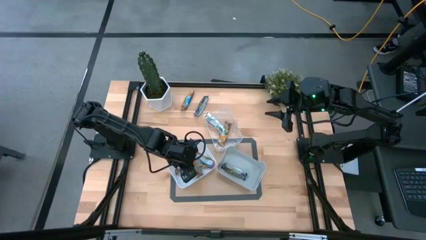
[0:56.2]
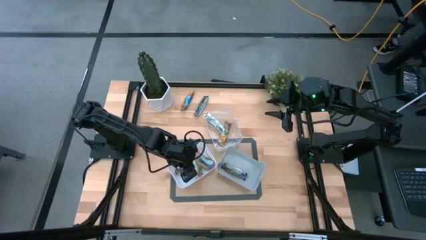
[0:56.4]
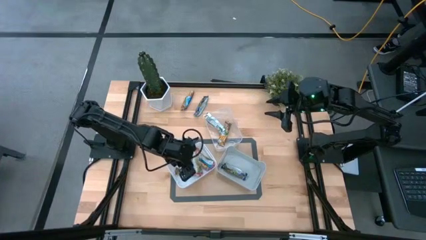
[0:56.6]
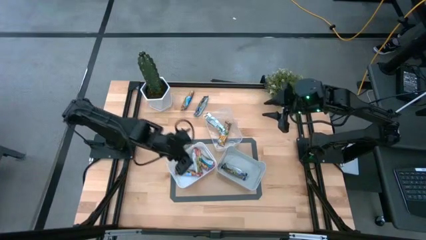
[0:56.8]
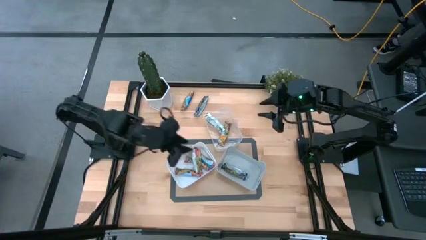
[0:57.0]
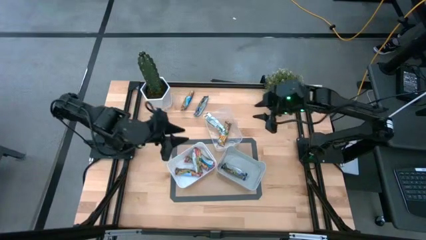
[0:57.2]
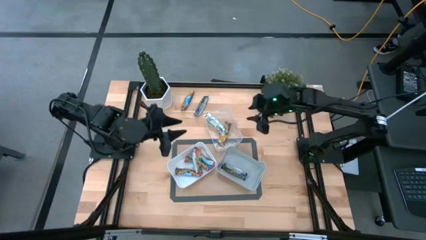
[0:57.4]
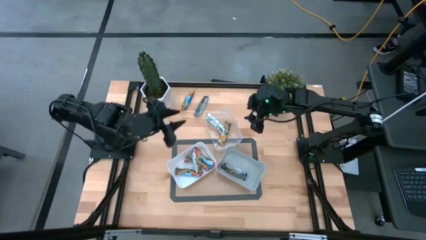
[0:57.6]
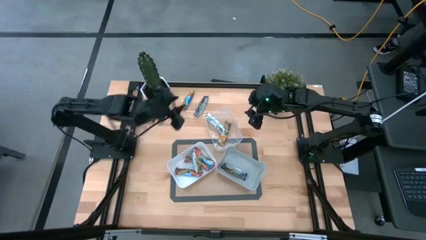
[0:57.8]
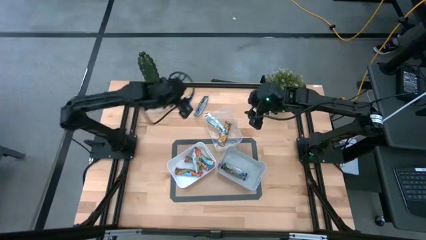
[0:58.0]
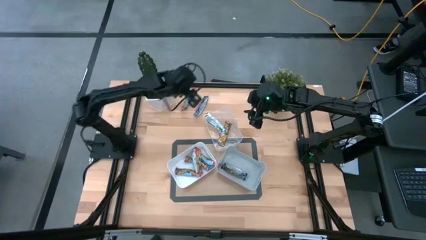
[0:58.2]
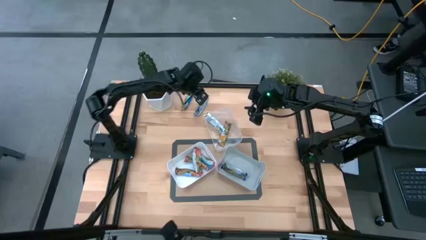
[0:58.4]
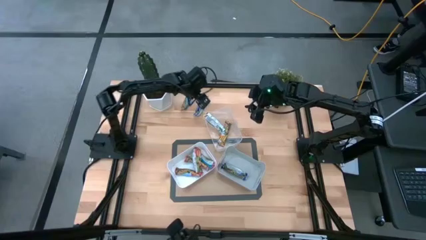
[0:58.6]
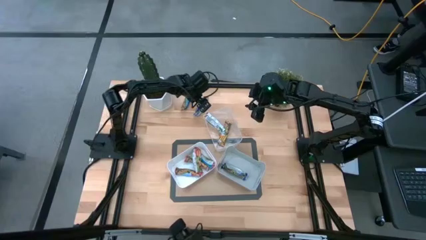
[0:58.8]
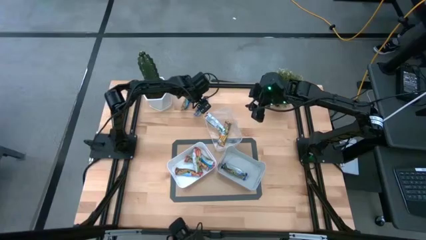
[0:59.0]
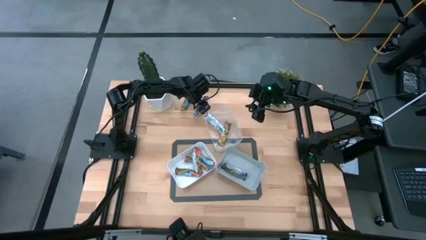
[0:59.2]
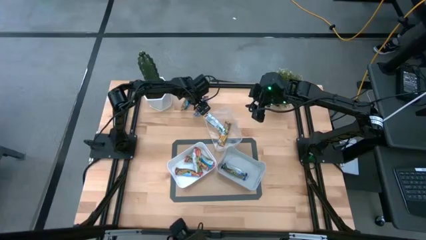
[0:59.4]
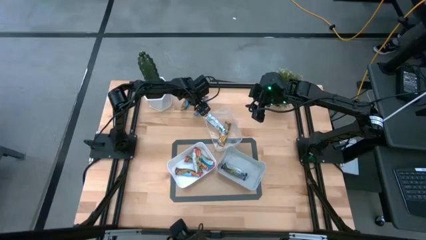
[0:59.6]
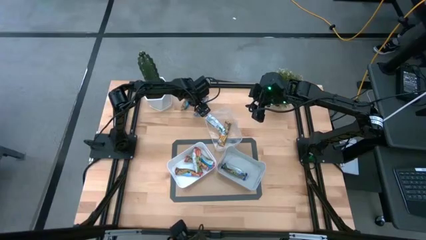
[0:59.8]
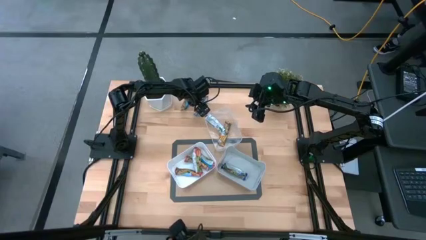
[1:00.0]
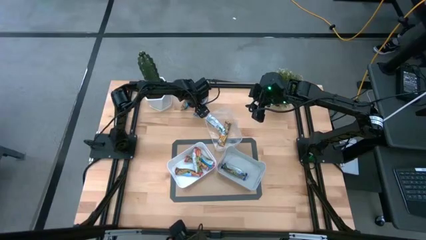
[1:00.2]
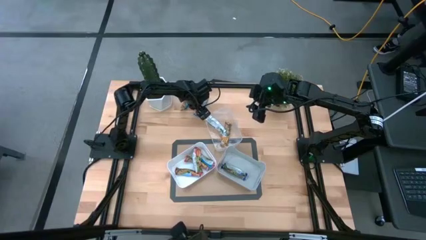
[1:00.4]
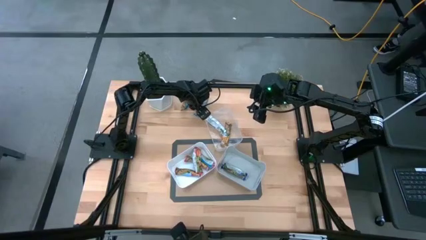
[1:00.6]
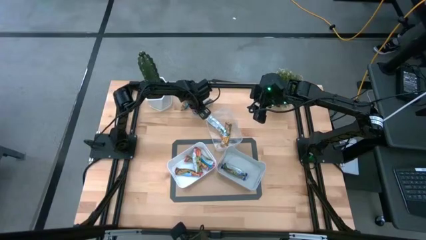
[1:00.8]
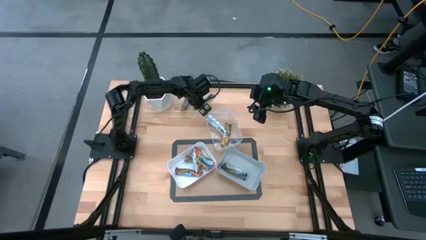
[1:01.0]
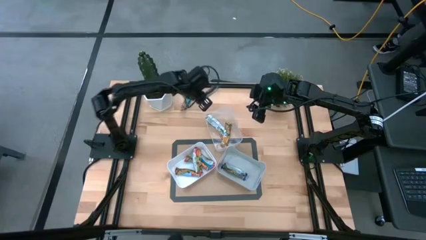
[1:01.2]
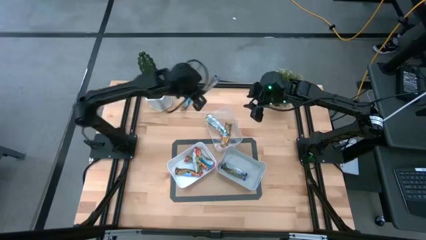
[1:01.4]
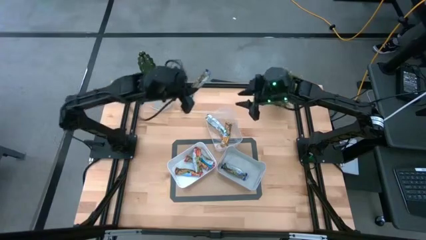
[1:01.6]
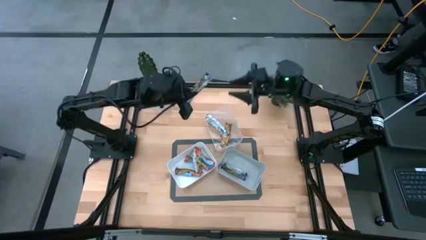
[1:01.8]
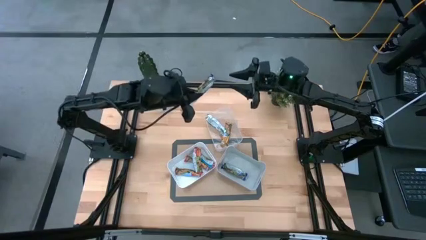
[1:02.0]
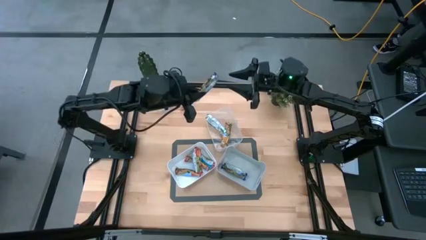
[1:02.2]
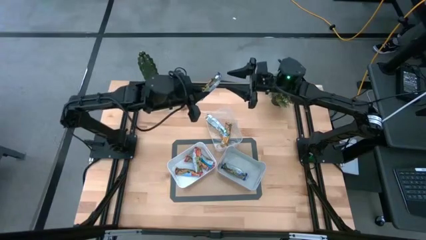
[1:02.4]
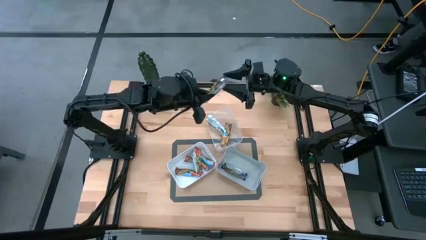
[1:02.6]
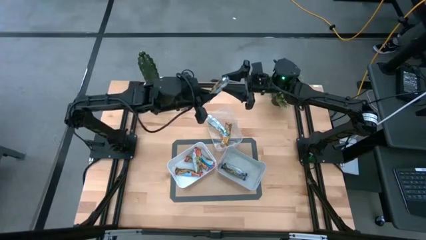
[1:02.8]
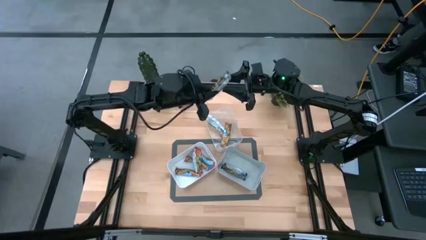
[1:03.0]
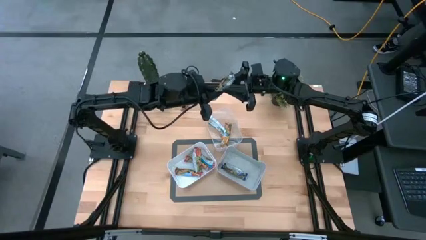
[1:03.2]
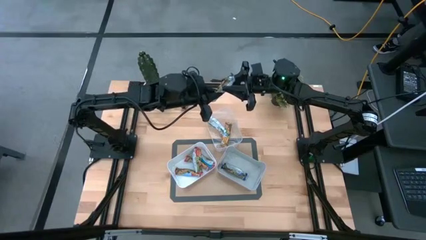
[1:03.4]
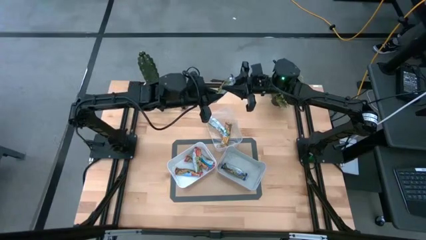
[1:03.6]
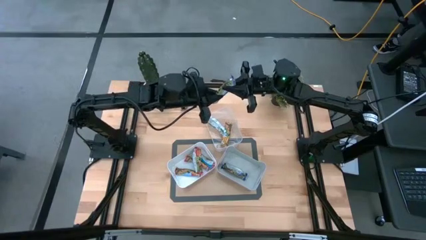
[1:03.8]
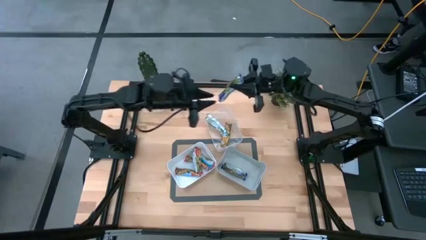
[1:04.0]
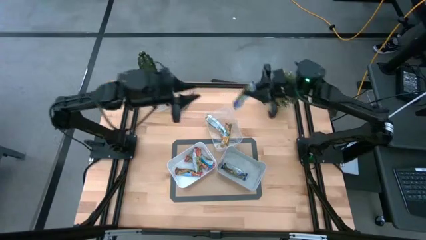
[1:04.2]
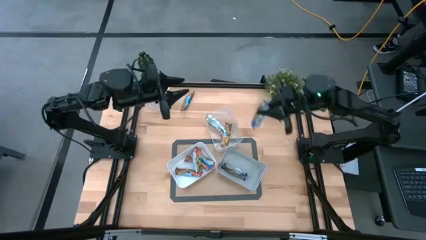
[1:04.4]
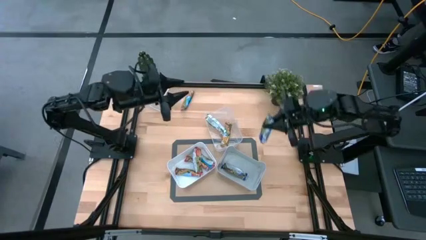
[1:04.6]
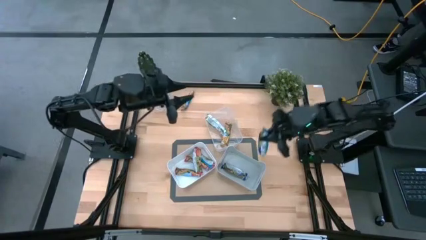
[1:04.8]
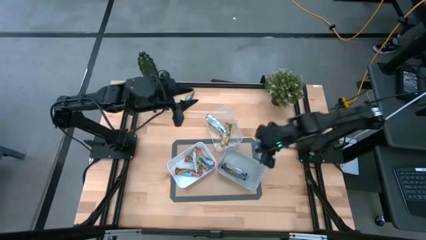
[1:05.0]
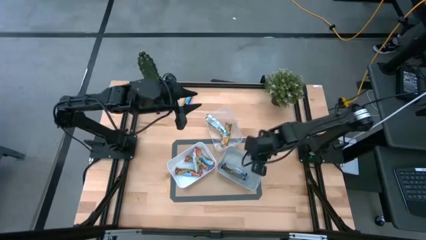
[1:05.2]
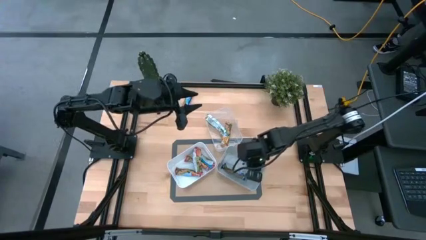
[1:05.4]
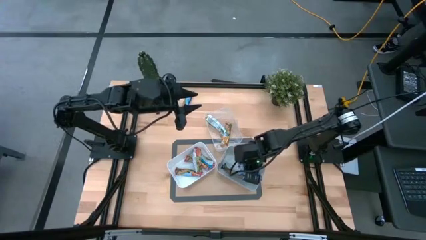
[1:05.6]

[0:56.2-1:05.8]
Task: Pick and place Granola Bars by type
Put the blue granola bar into the gray bin

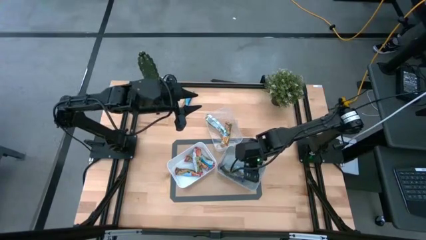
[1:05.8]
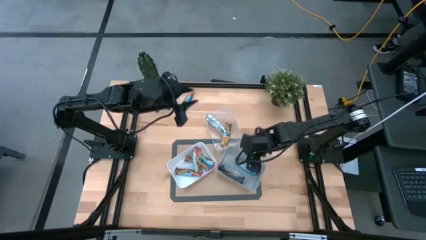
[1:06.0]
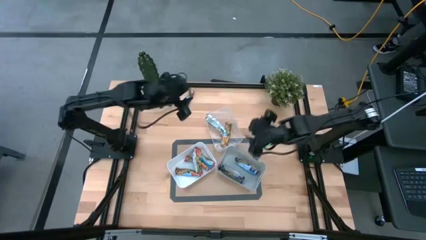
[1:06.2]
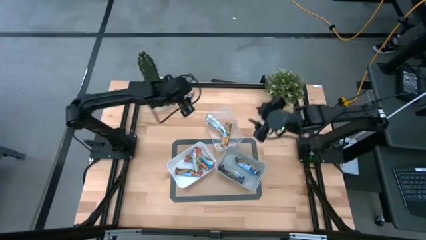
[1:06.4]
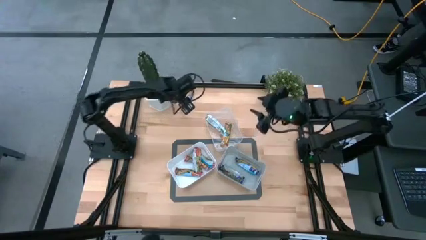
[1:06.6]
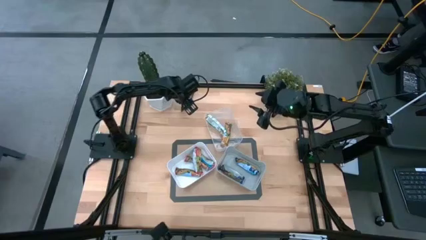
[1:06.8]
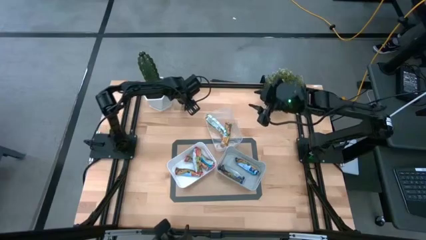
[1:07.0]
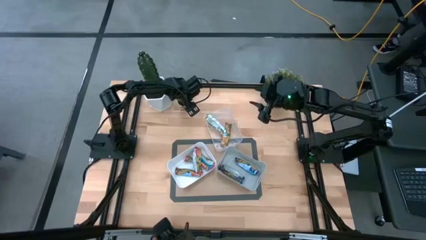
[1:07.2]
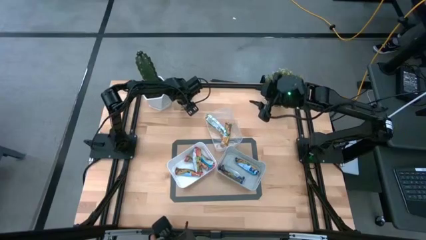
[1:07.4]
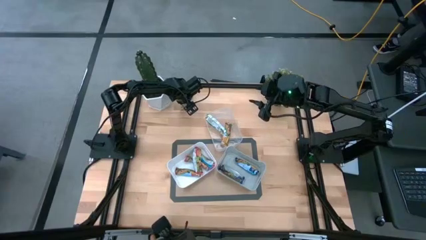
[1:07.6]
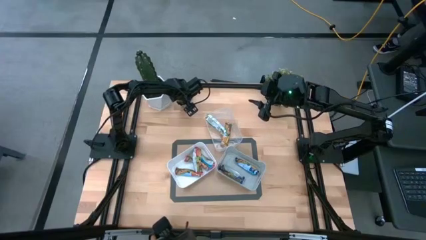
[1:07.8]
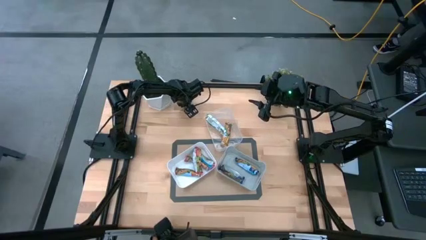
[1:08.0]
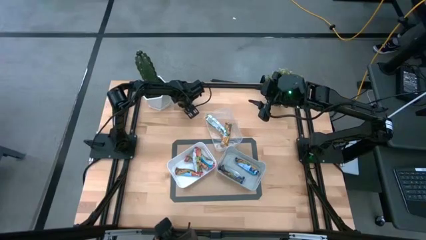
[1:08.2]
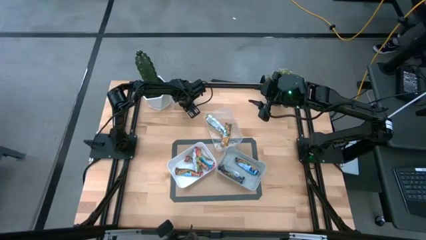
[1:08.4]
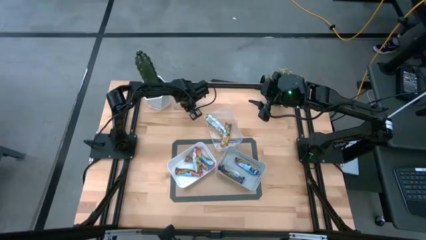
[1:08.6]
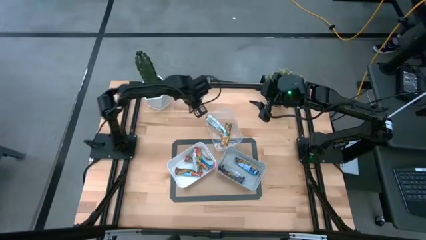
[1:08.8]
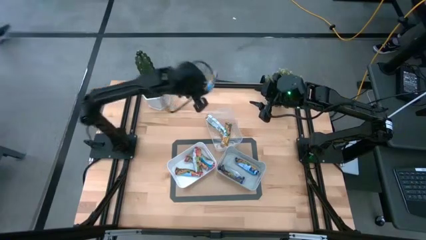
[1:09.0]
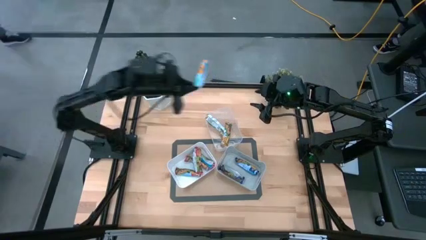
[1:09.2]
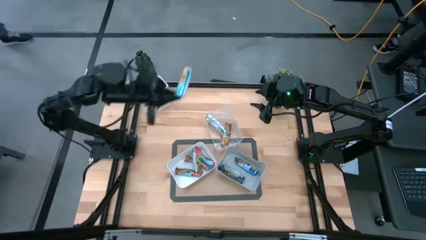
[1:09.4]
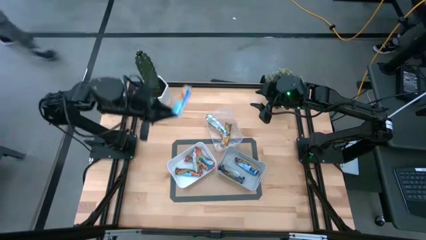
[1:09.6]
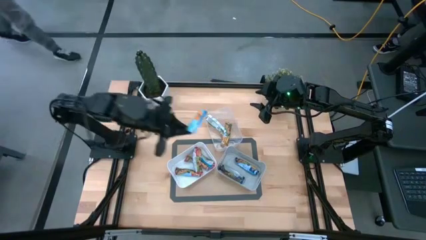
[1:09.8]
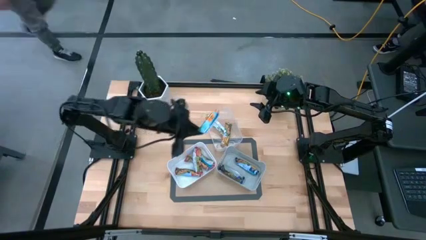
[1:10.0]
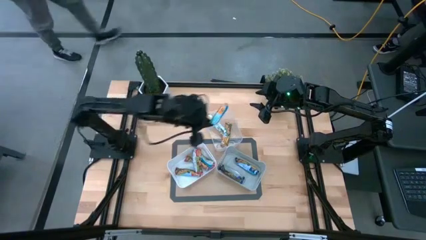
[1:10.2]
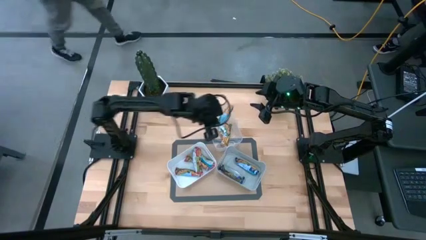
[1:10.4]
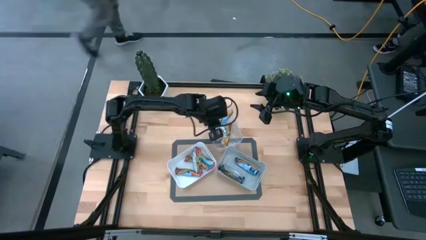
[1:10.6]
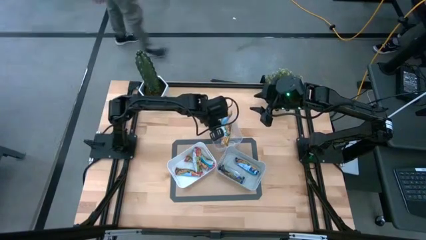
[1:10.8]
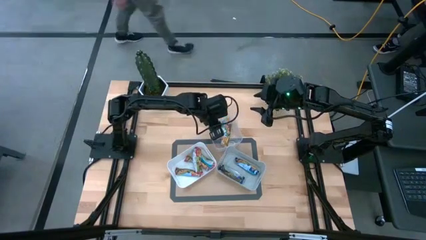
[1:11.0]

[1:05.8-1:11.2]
Put the yellow granola bar into the transparent bin

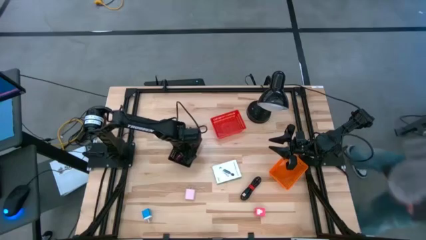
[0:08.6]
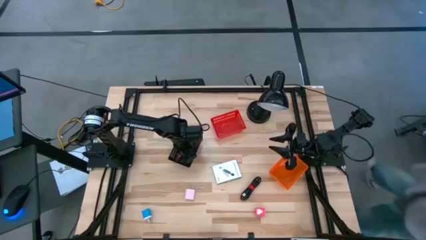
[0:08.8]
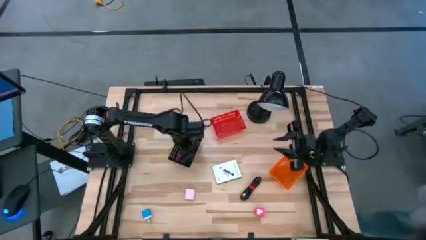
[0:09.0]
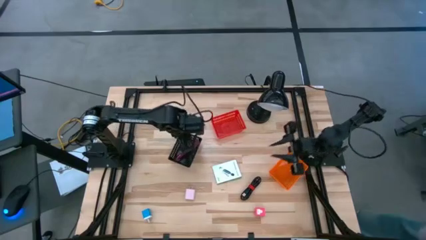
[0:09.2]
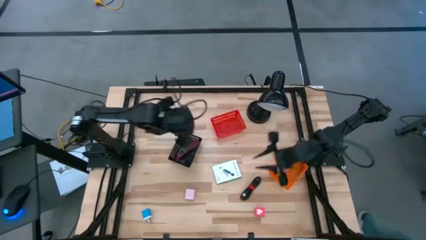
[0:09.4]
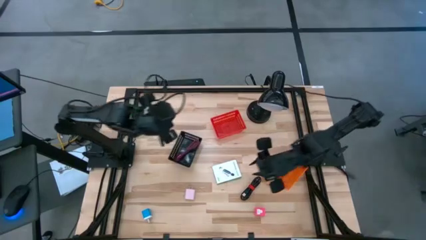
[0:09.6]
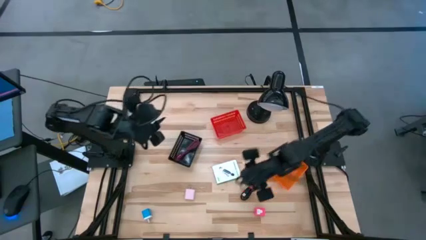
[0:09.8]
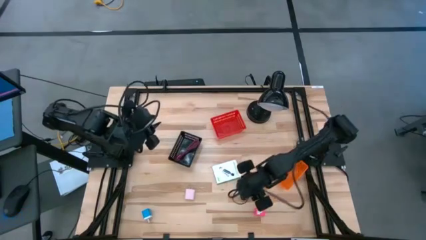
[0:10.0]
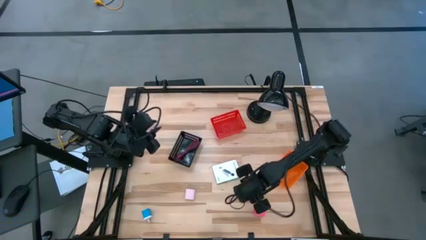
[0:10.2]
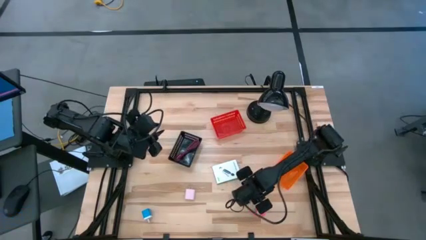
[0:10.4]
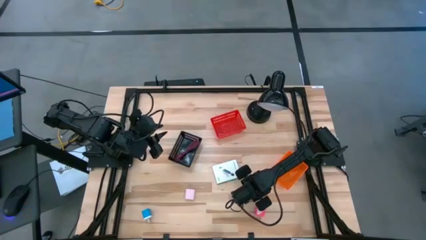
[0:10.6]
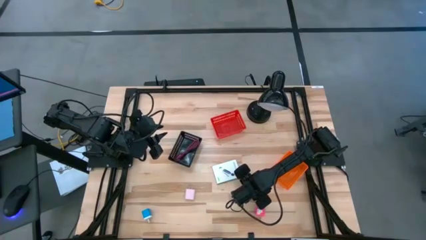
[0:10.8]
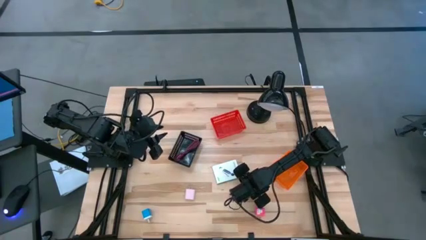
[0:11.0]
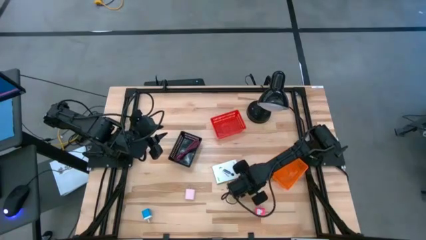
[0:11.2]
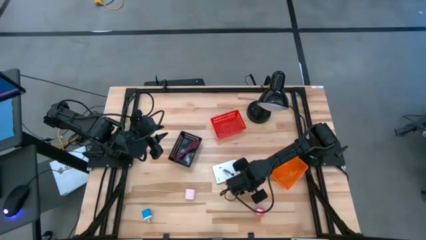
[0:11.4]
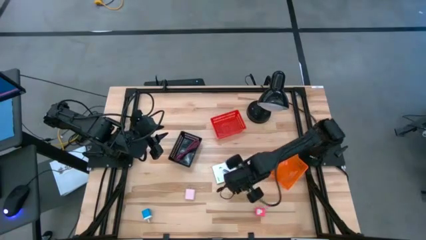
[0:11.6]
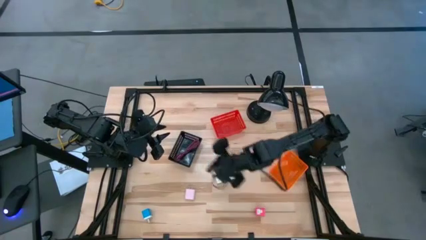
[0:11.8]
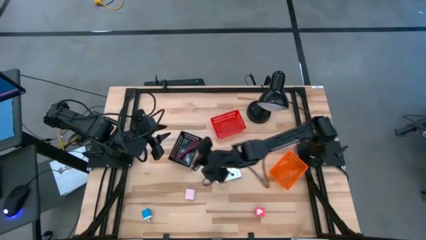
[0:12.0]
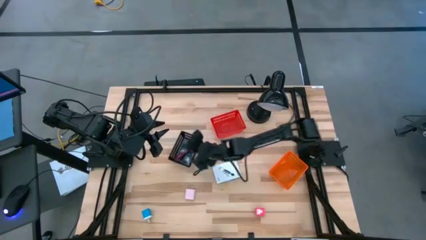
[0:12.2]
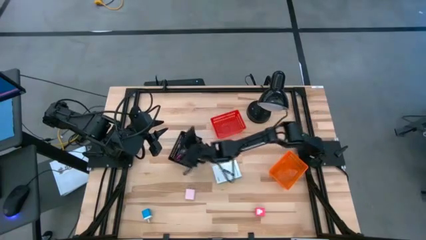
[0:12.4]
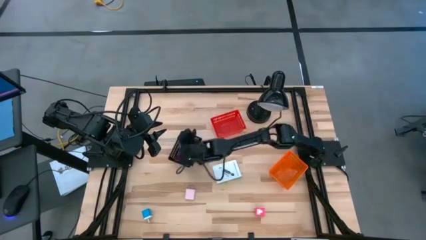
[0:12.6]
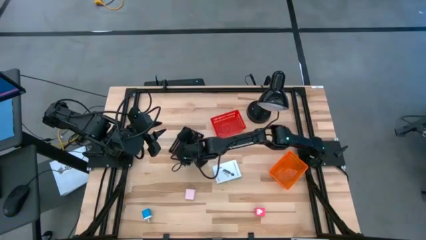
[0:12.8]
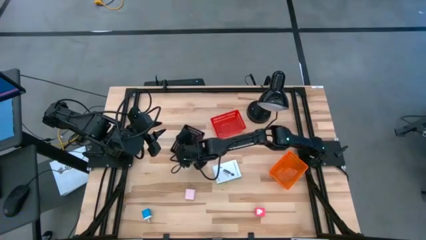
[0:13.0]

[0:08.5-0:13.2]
Task: Pick and place items into bin
Put the black charger cable into the black bin
